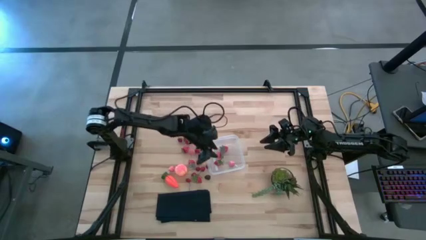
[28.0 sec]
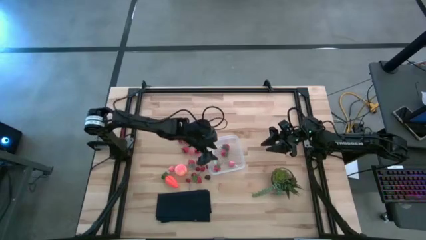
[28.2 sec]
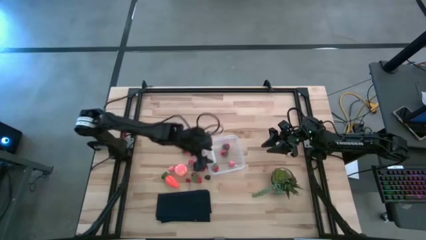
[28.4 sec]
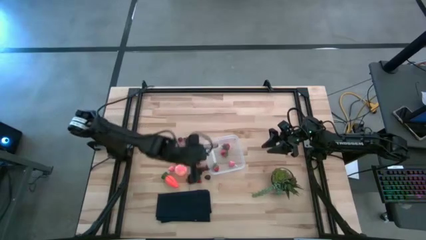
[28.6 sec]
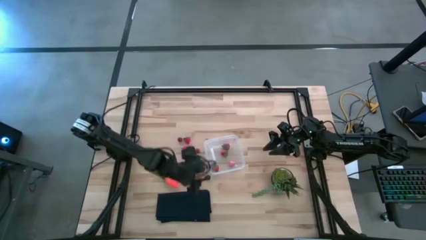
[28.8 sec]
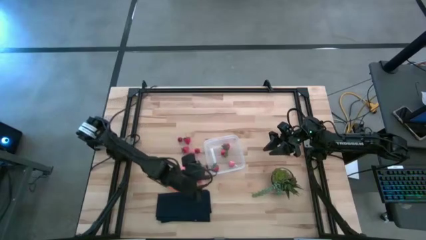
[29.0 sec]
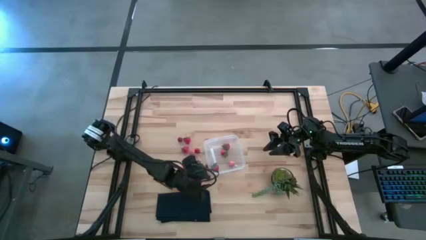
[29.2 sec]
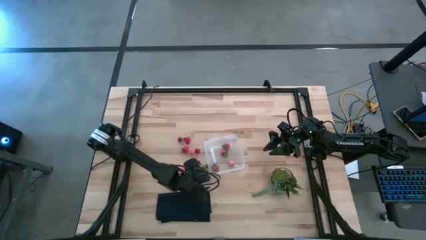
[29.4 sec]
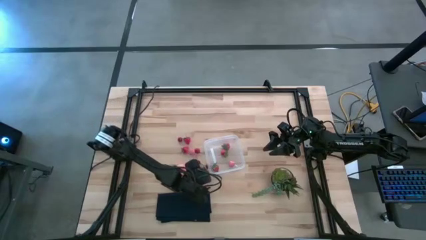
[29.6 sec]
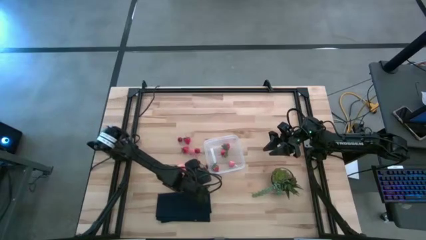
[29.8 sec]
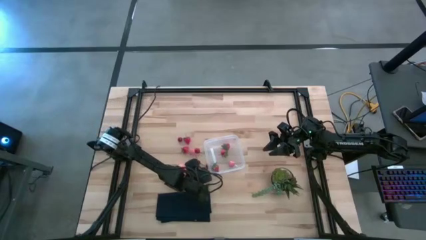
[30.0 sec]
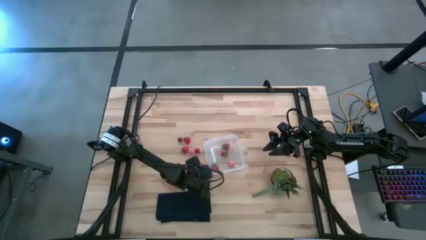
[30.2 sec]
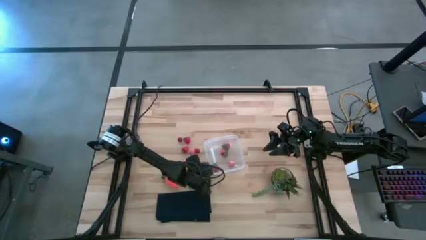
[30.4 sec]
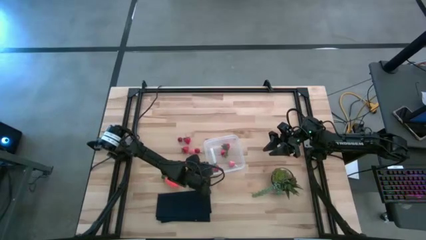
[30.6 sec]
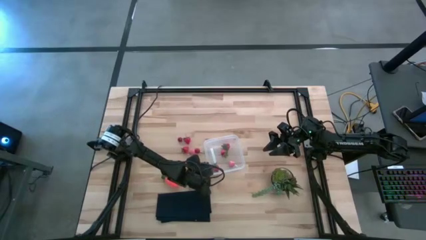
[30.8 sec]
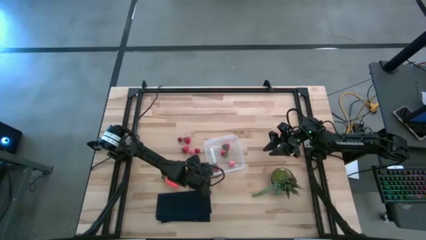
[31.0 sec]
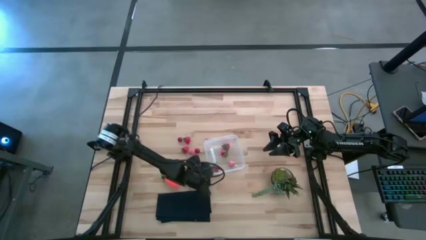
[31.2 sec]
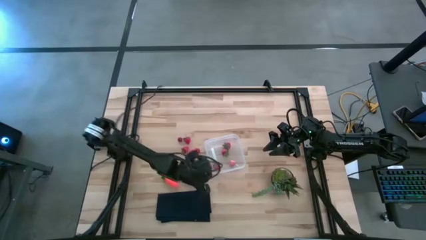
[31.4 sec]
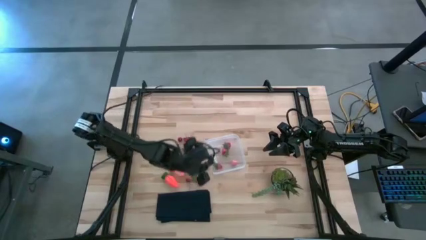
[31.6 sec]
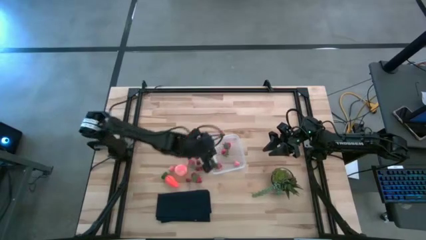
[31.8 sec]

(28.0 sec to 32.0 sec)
Task: Pick and placing Produce into tupperware
Put the blackberry into the container

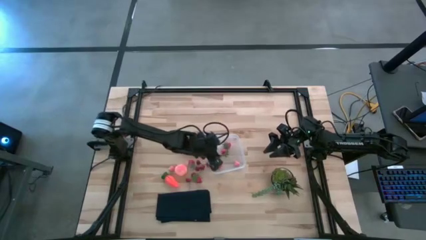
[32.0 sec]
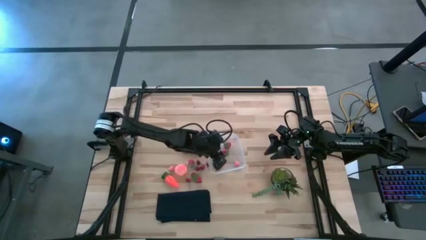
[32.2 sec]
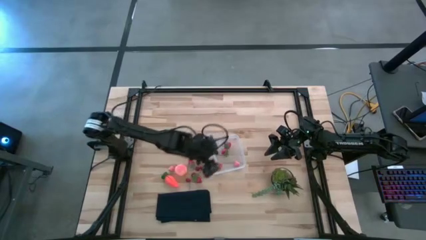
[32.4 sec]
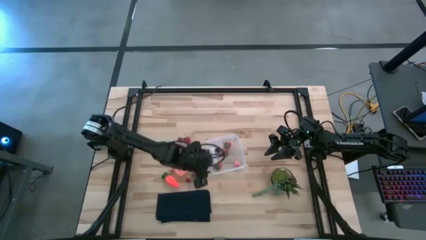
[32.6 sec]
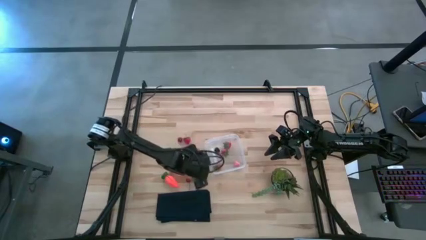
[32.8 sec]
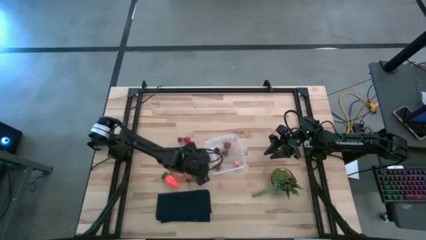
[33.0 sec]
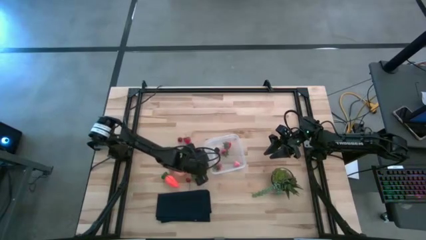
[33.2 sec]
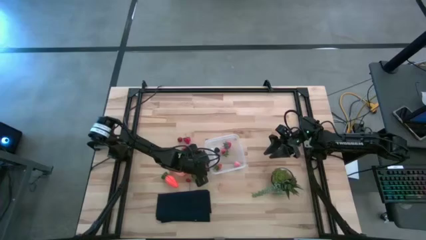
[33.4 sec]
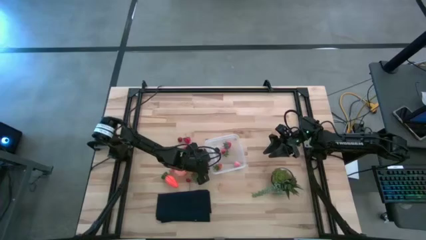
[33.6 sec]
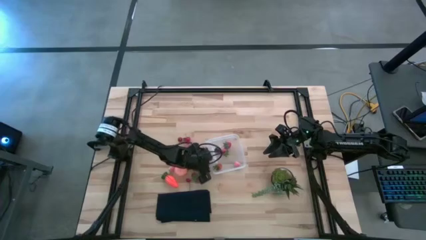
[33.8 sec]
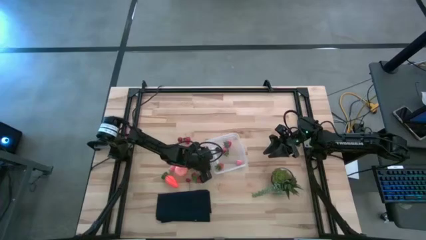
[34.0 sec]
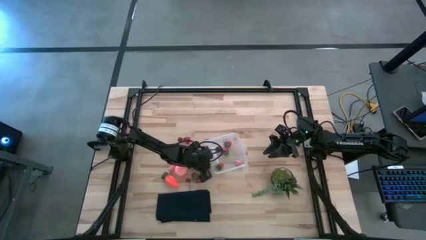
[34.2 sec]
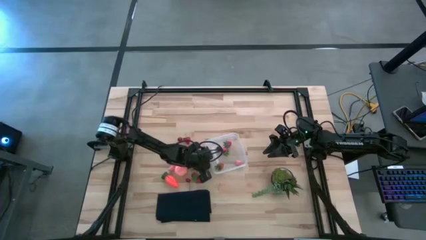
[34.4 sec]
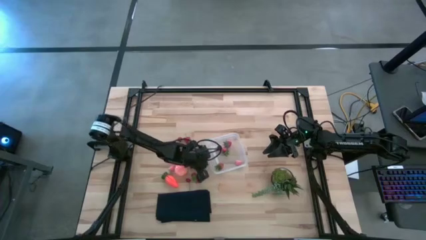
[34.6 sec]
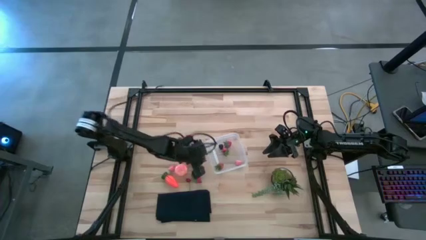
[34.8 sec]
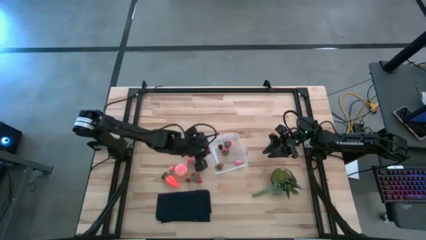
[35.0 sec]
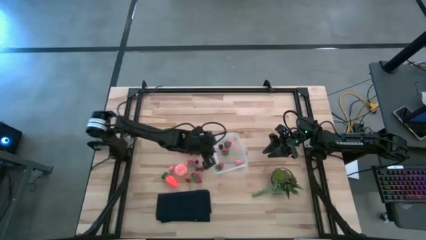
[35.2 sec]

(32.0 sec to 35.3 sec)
Put the red cherry into the container

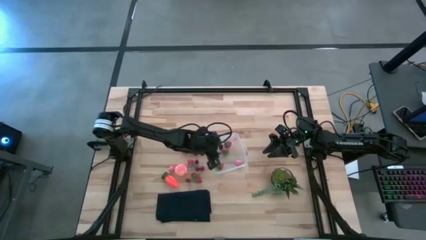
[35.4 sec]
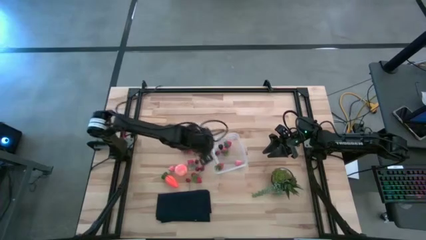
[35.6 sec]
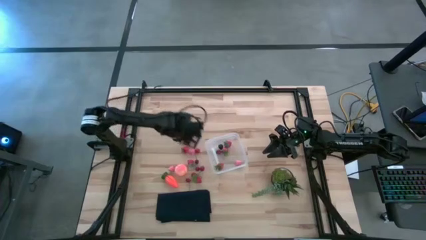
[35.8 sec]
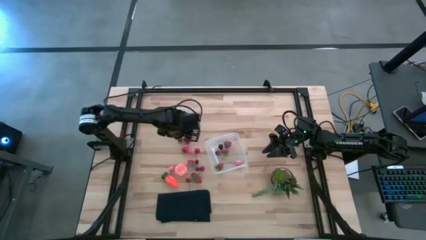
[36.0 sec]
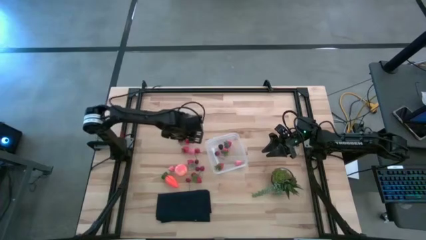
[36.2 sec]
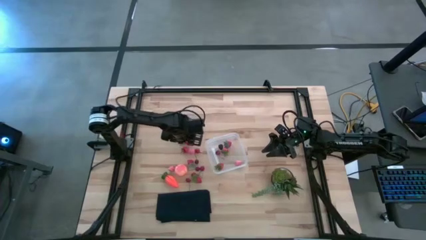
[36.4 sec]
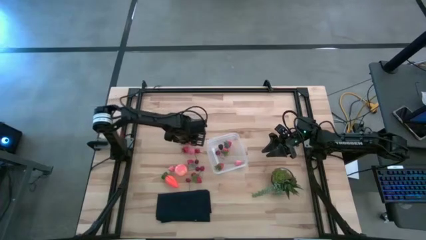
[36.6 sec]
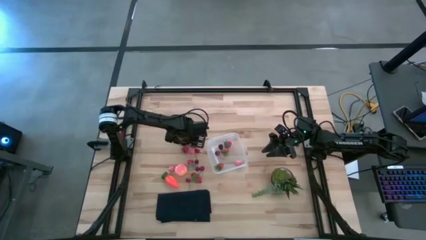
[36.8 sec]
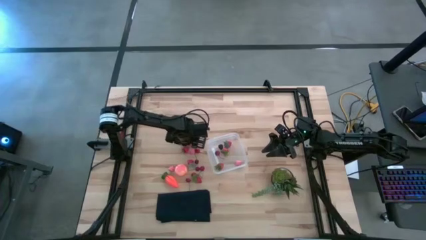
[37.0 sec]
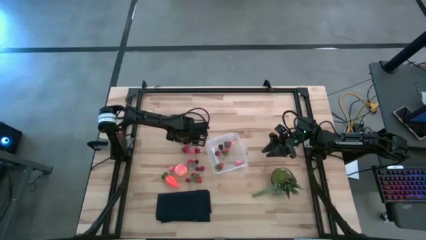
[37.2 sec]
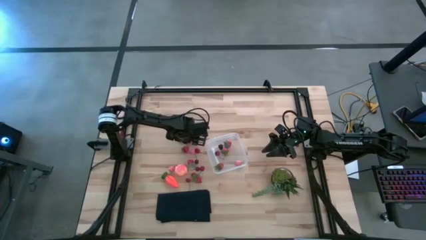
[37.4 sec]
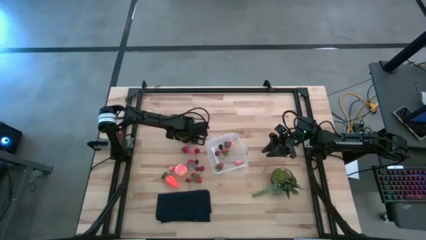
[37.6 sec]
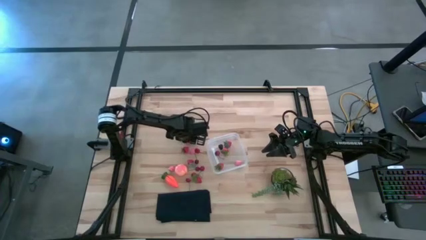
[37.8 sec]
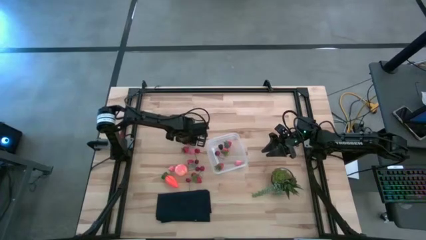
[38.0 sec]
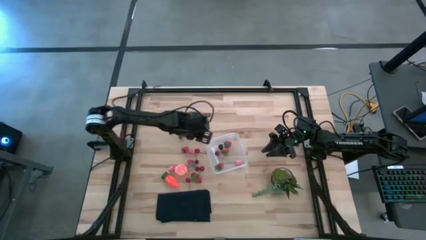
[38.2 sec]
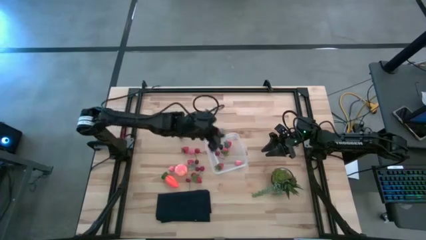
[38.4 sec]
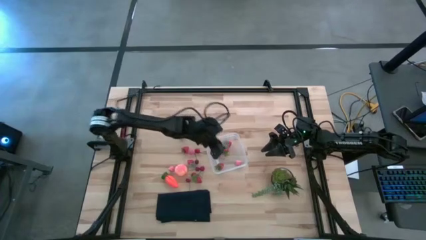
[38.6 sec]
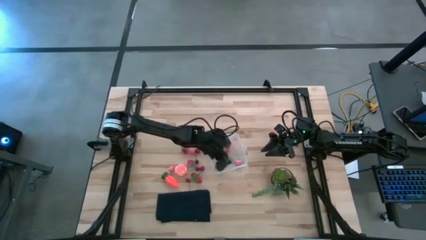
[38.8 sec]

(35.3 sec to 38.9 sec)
Put the red strawberry into the container

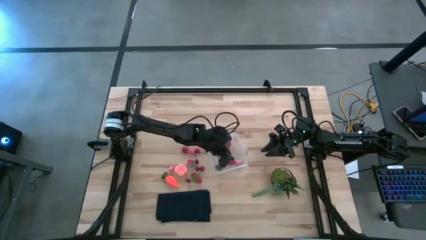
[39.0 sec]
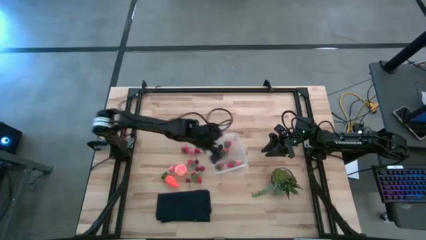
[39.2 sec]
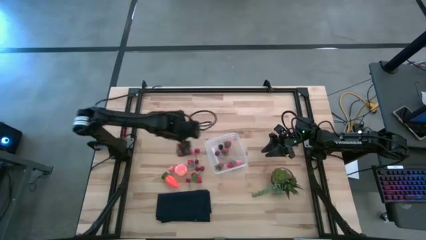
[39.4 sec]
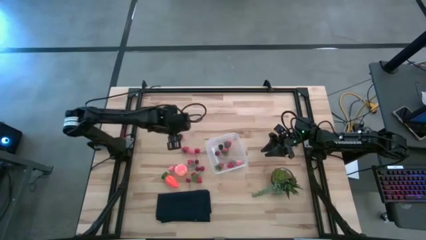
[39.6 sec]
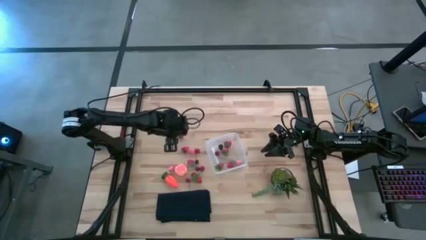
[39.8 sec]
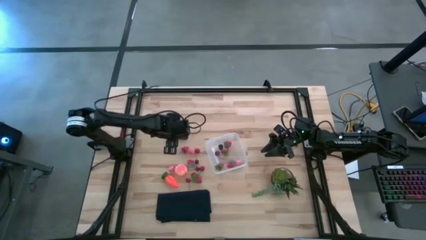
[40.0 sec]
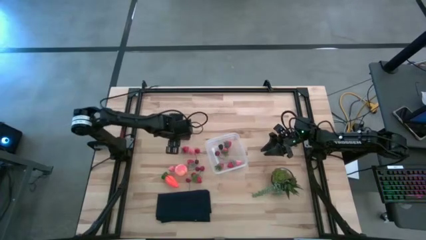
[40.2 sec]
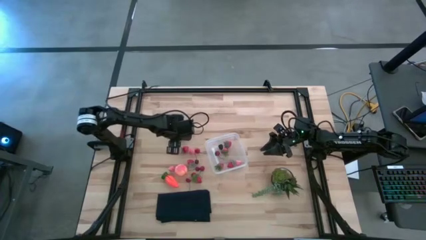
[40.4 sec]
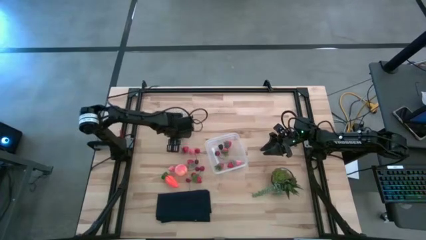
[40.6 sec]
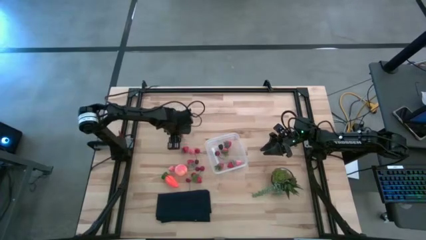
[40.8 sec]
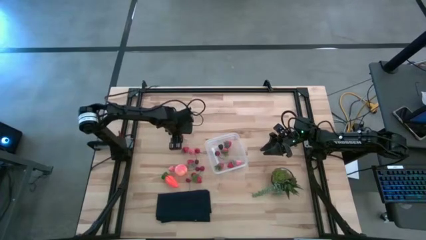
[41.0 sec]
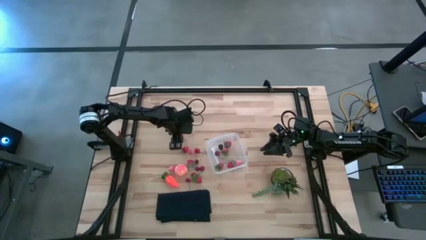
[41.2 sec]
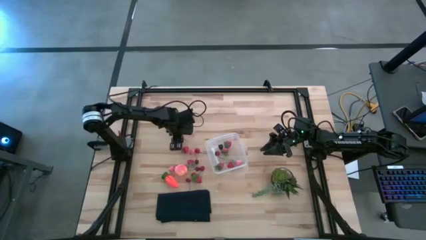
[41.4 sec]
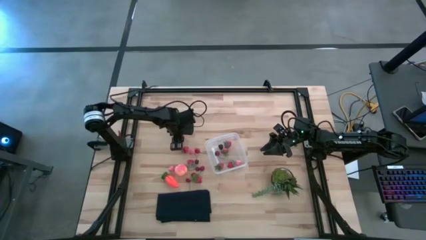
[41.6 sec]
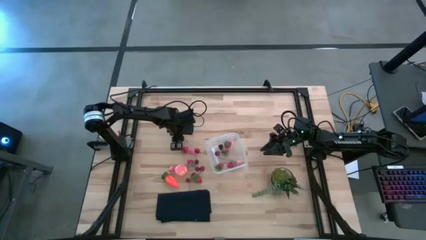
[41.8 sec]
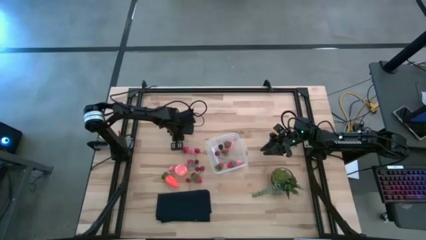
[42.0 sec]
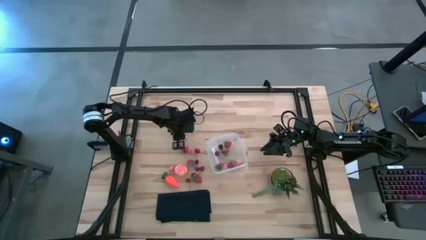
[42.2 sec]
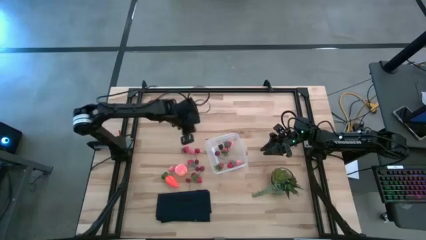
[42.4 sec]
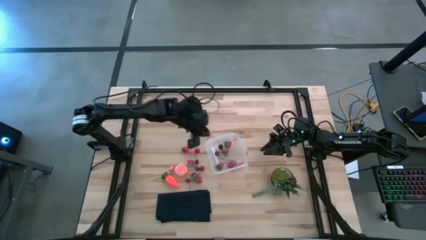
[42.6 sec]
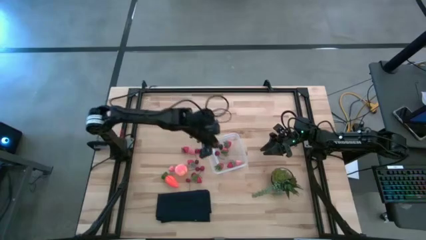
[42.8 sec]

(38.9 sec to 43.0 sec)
Put the red cherry into the container

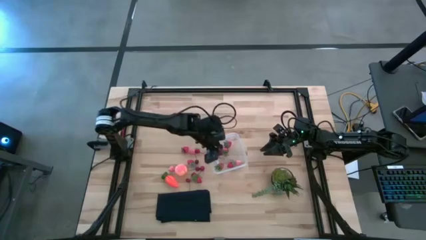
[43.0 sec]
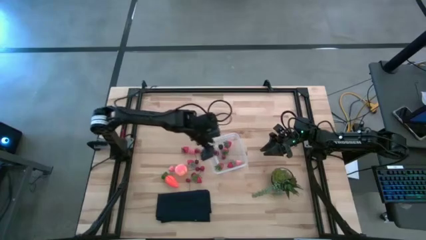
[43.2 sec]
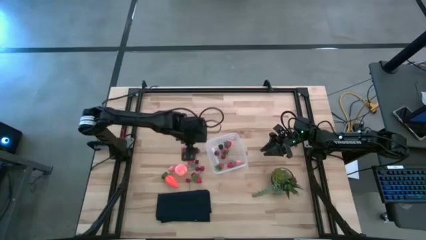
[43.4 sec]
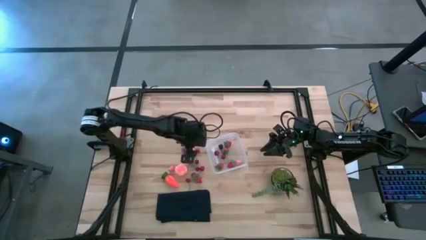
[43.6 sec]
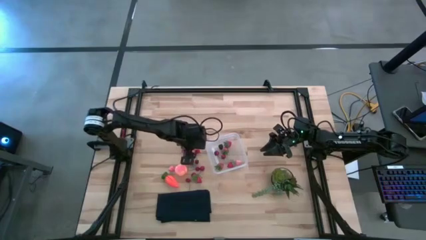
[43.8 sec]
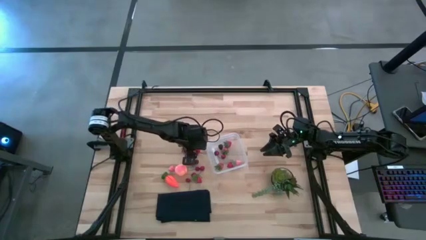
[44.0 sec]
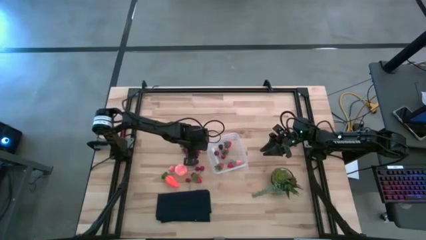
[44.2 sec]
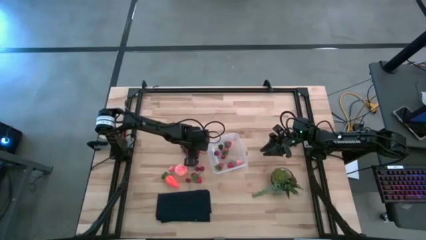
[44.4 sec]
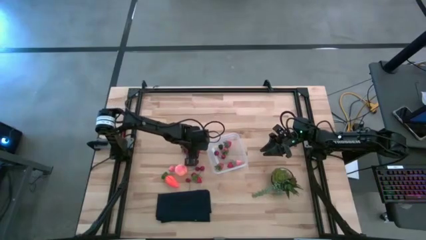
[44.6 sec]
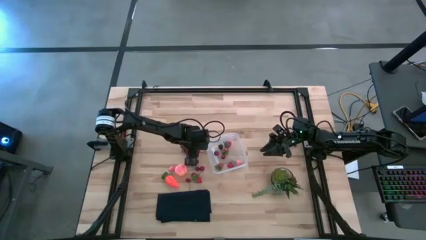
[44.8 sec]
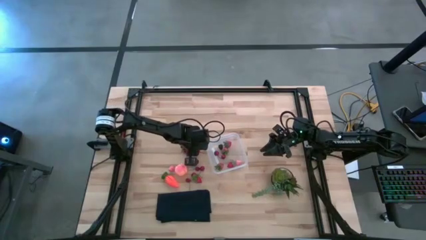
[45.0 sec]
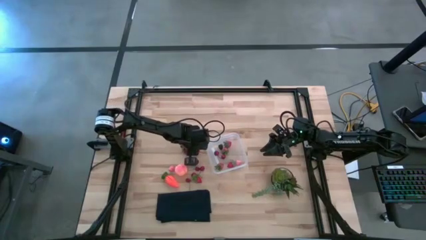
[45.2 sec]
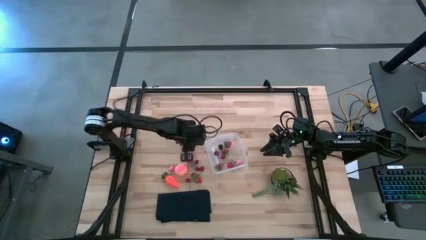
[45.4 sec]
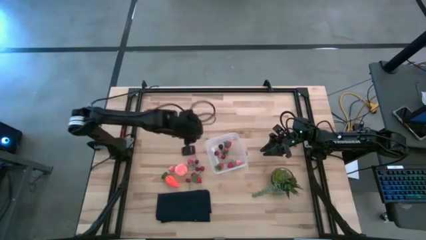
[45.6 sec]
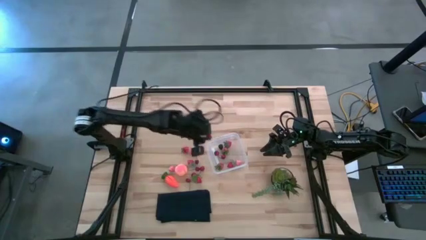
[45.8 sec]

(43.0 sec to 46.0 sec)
Put the red cherry into the container
